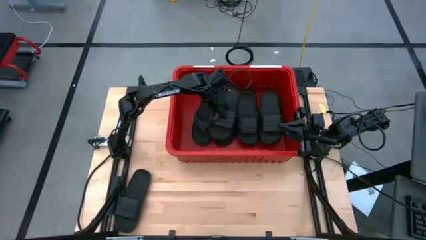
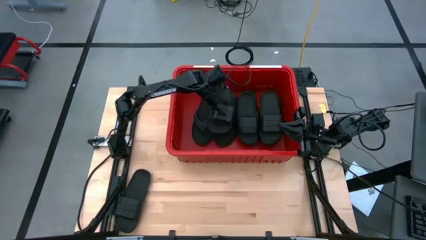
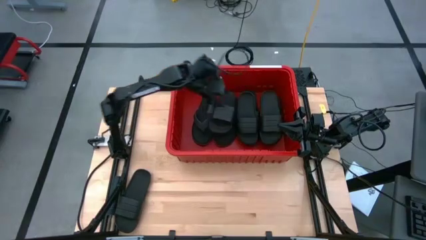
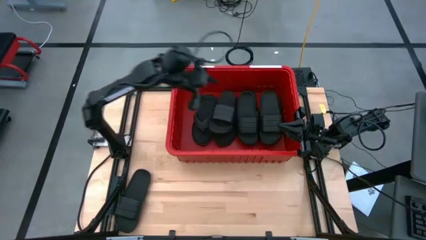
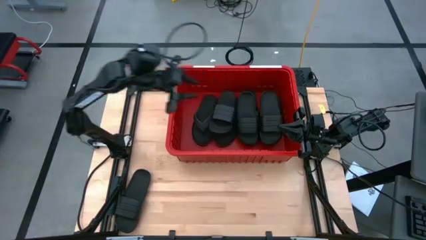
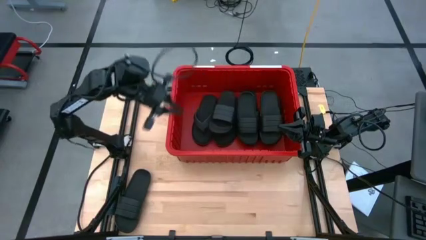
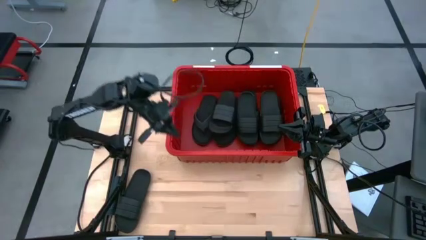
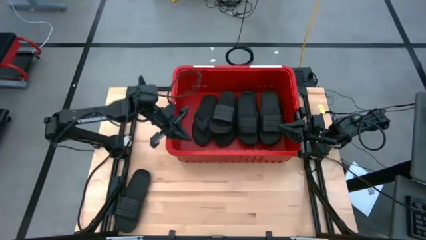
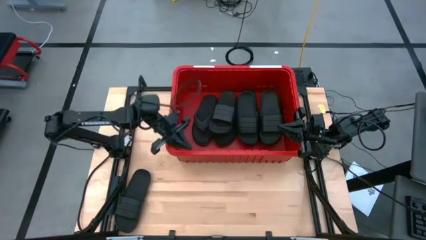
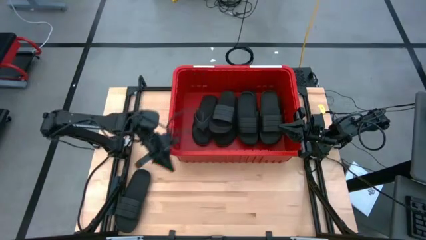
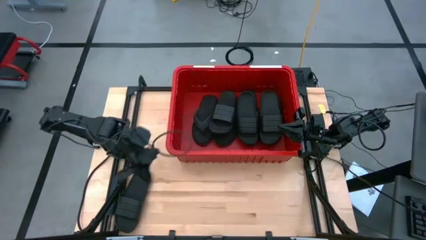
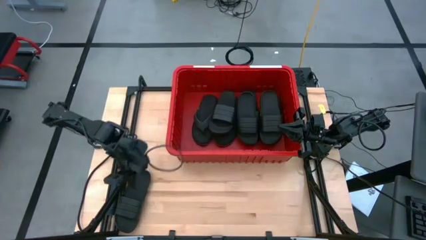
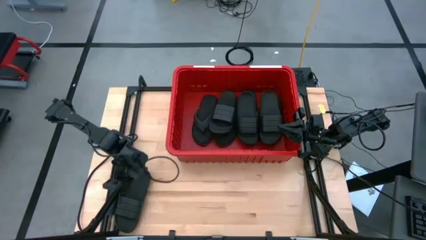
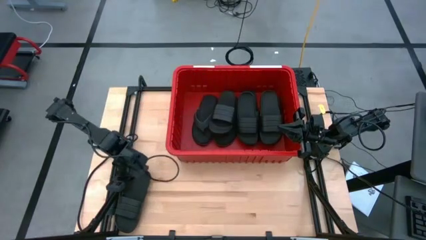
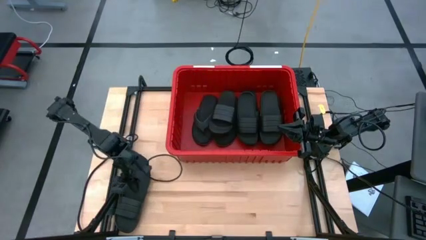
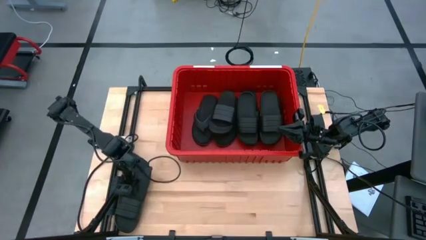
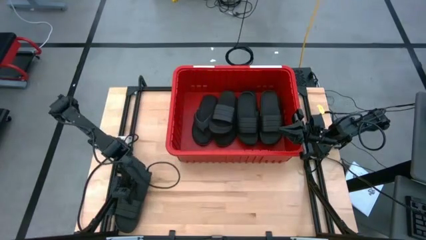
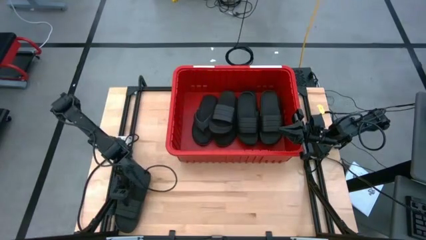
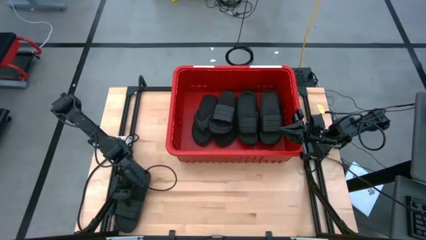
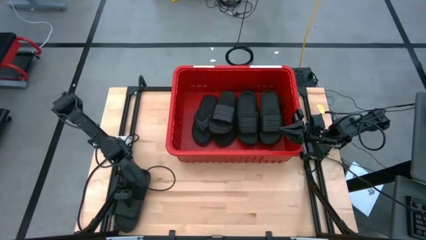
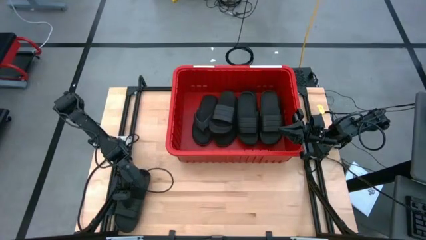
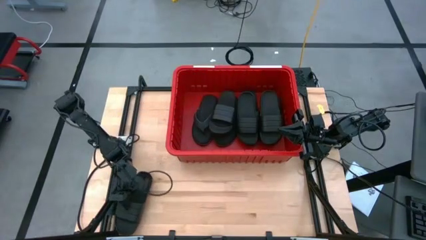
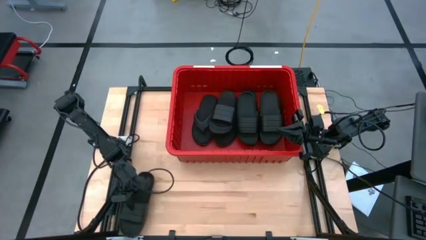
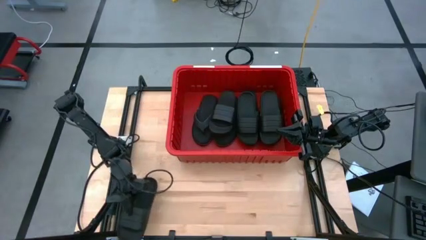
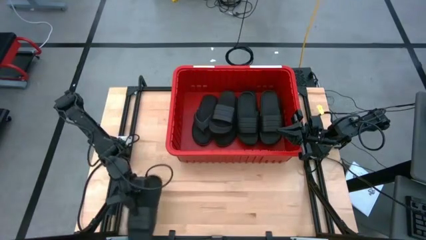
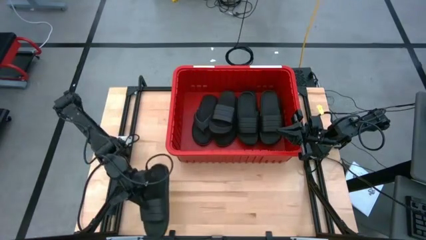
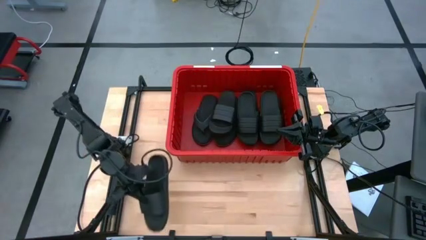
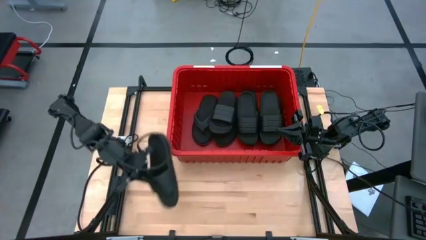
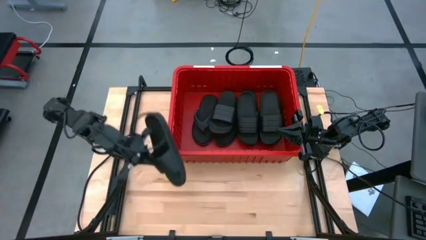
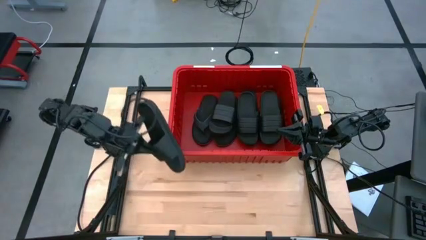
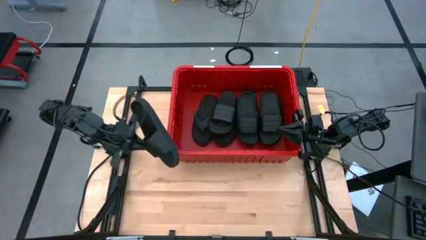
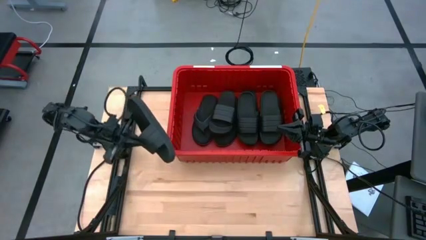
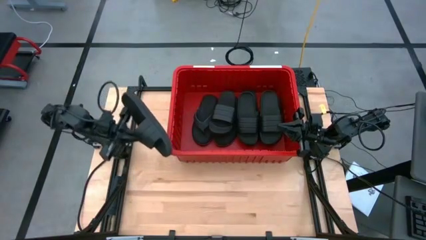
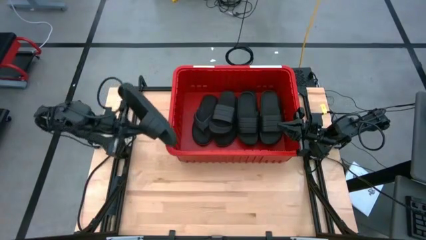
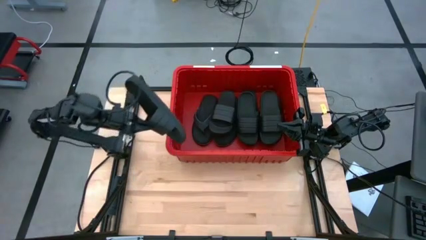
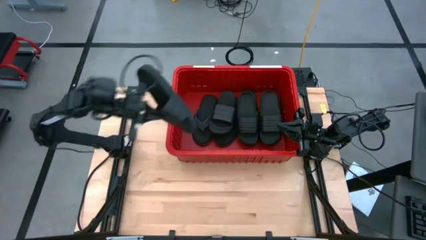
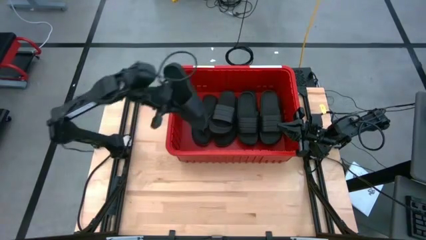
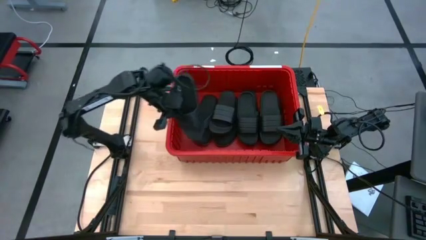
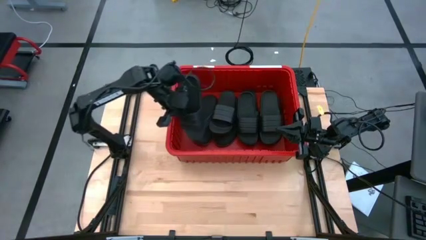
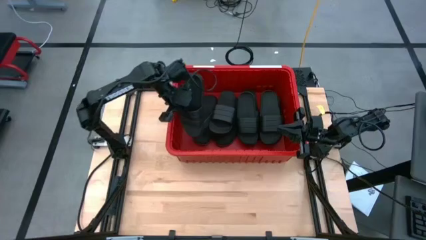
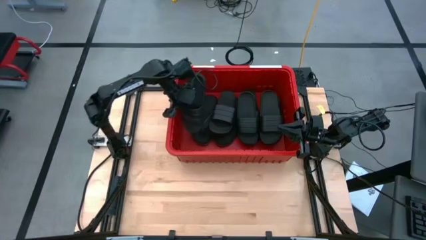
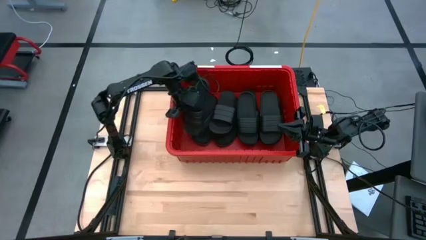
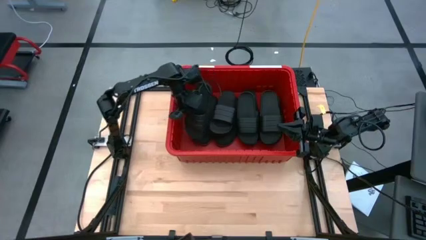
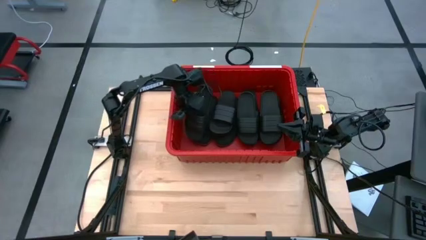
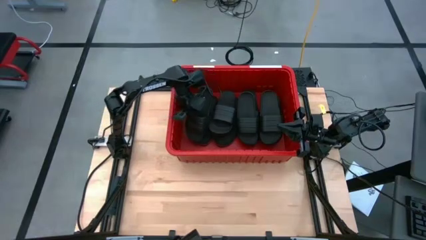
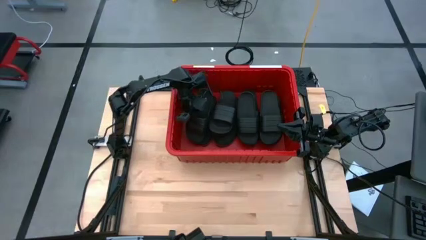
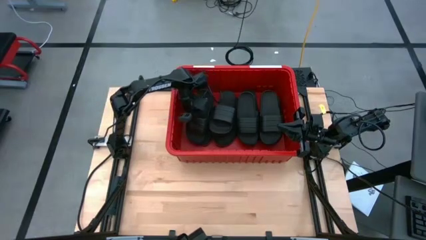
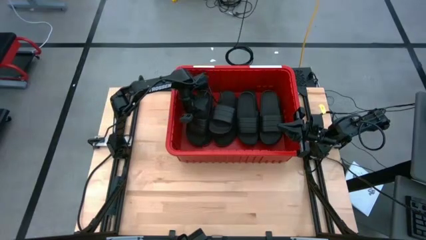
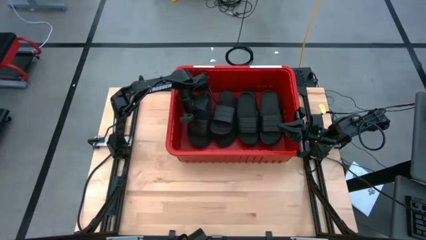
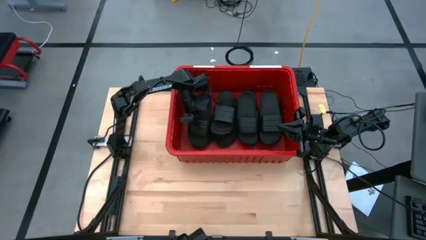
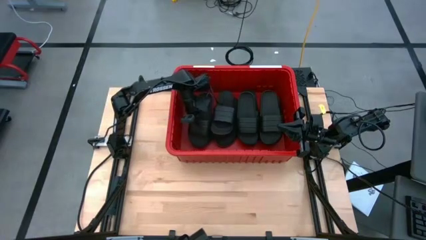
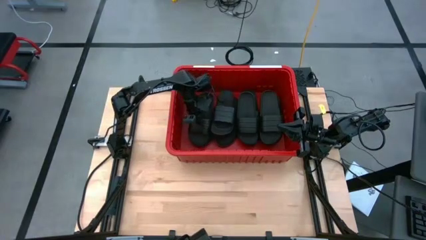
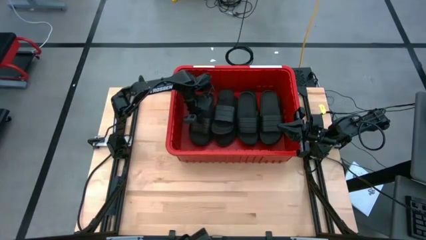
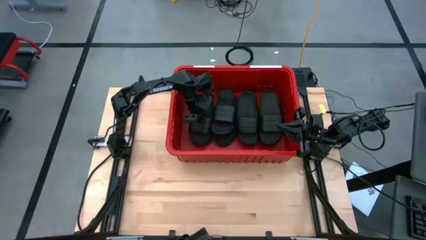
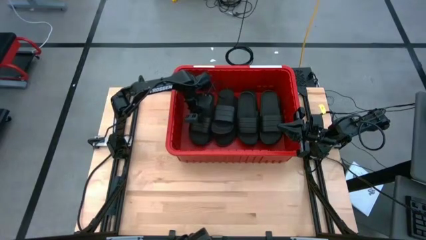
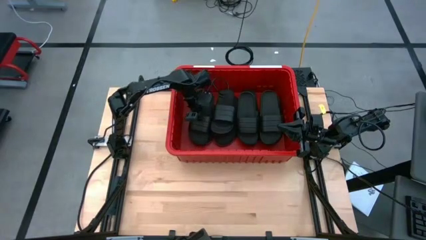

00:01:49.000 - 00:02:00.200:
Task: Pick and place slides into bin
Put the black slide into the red container
